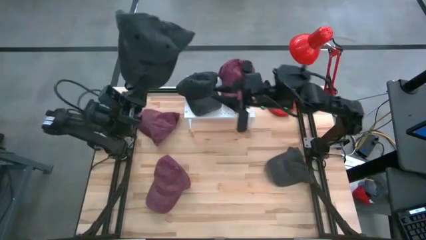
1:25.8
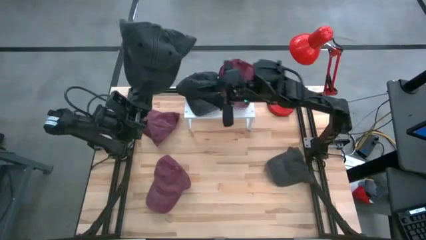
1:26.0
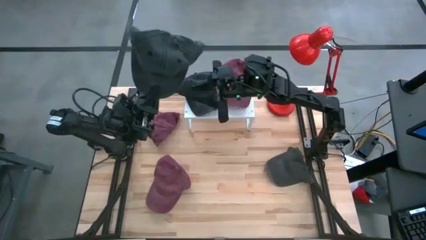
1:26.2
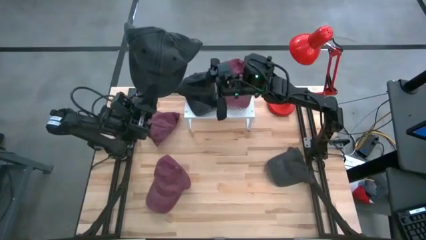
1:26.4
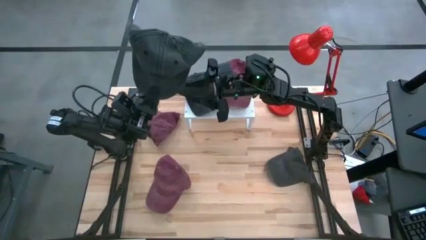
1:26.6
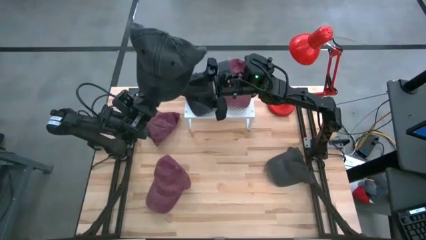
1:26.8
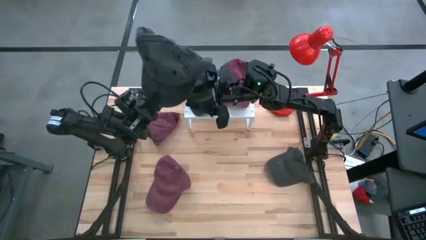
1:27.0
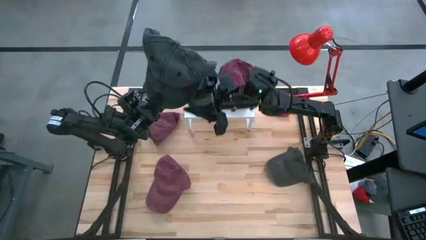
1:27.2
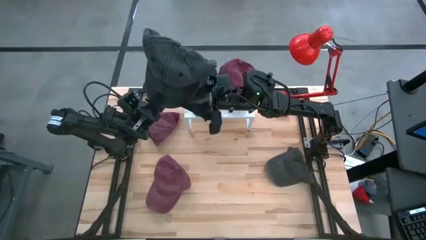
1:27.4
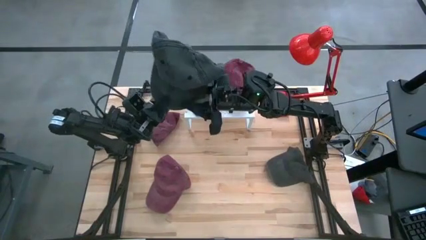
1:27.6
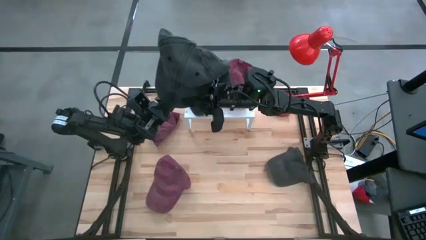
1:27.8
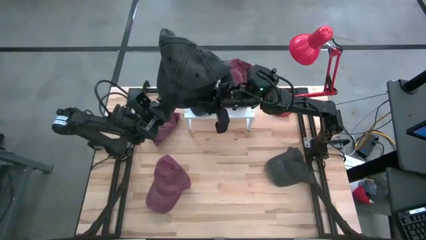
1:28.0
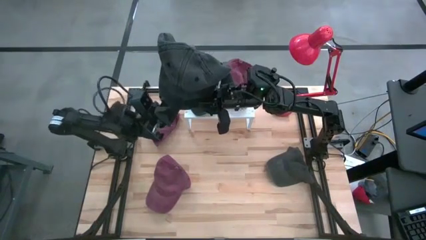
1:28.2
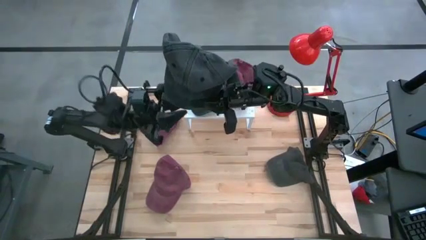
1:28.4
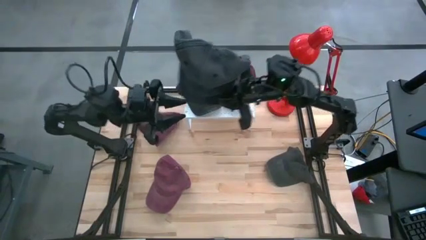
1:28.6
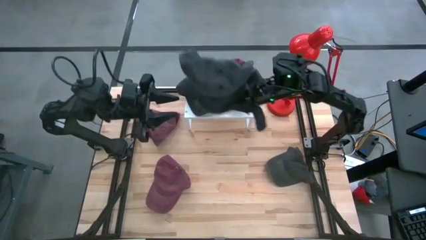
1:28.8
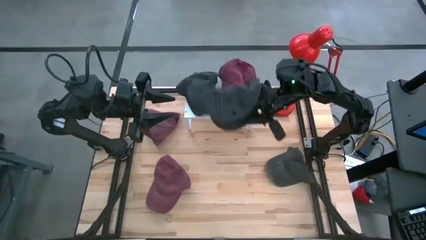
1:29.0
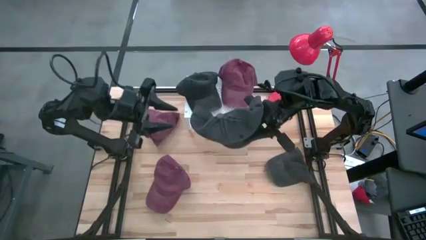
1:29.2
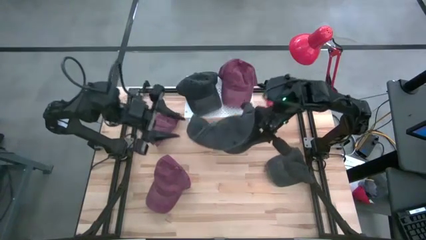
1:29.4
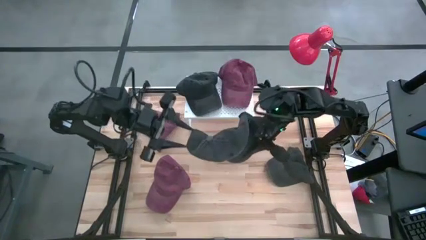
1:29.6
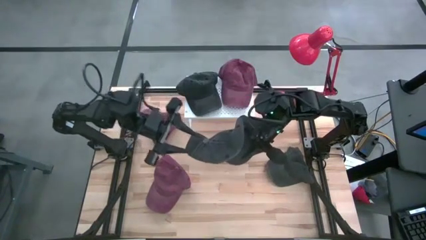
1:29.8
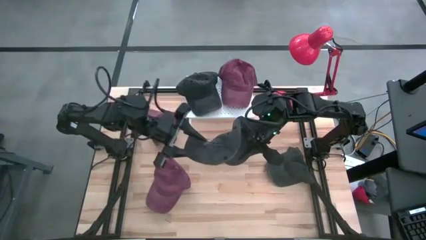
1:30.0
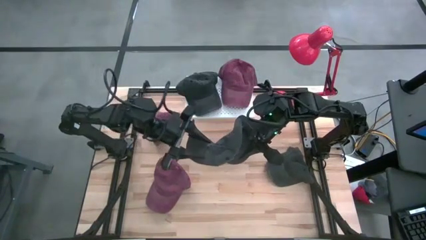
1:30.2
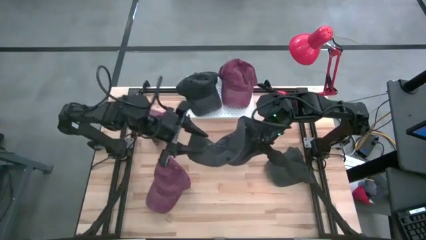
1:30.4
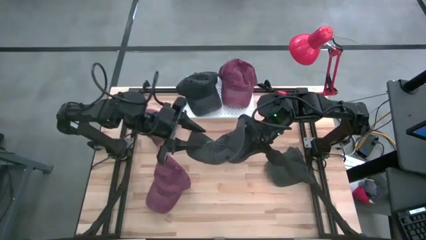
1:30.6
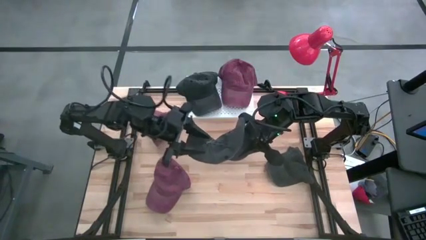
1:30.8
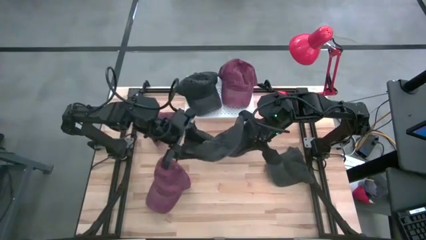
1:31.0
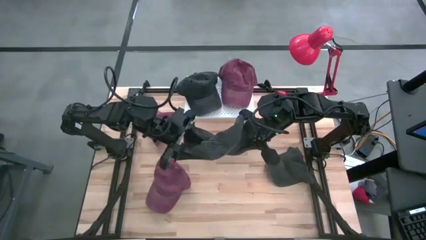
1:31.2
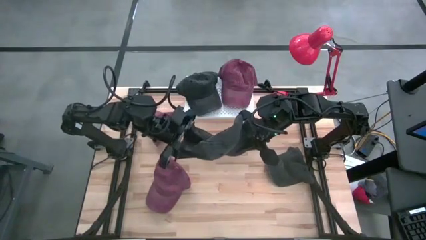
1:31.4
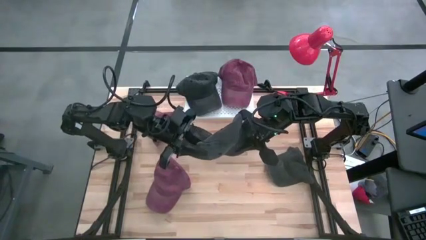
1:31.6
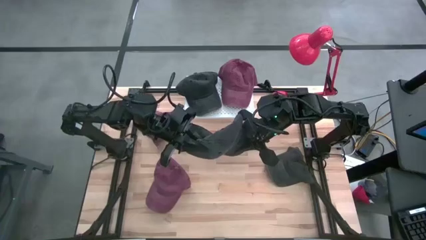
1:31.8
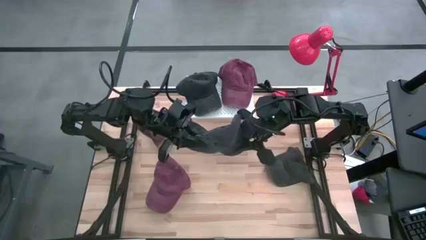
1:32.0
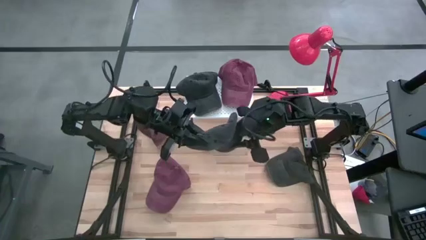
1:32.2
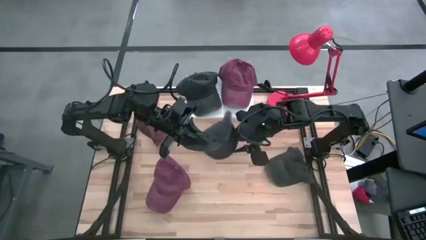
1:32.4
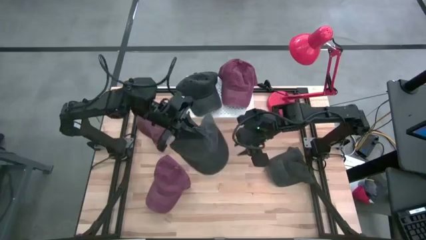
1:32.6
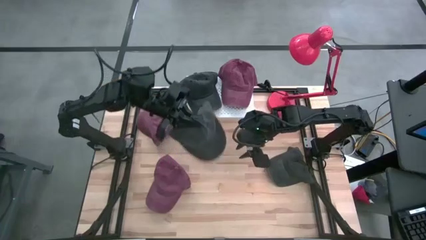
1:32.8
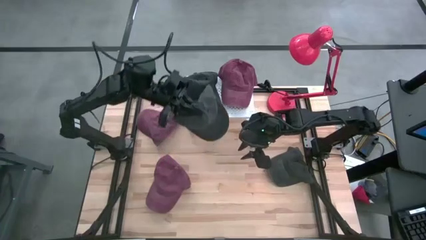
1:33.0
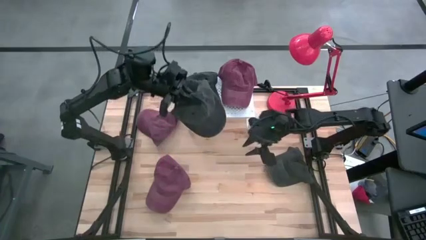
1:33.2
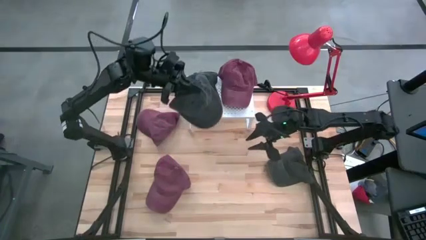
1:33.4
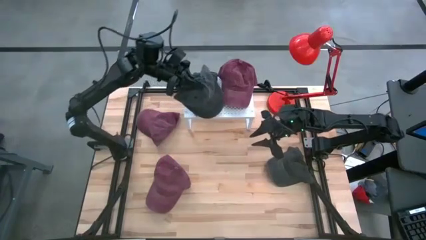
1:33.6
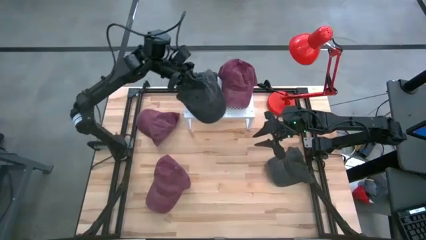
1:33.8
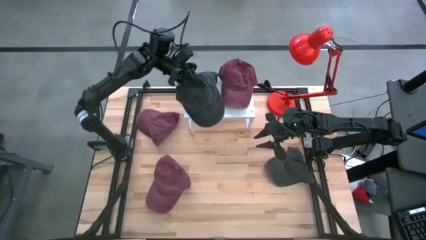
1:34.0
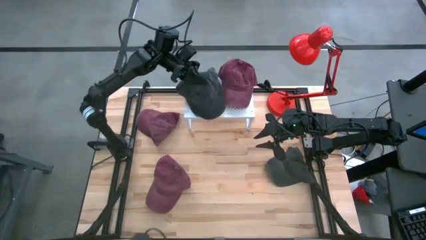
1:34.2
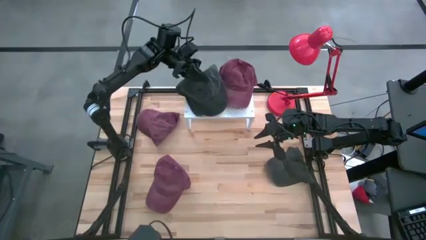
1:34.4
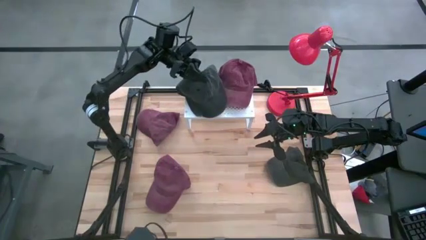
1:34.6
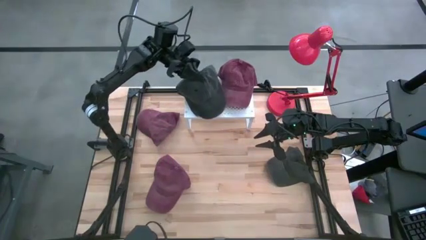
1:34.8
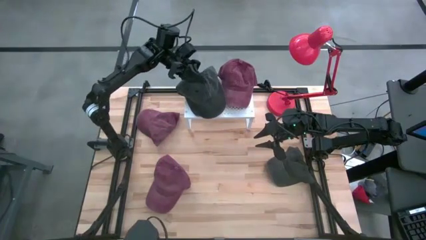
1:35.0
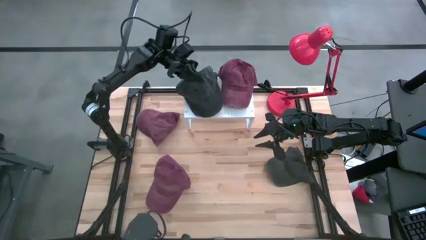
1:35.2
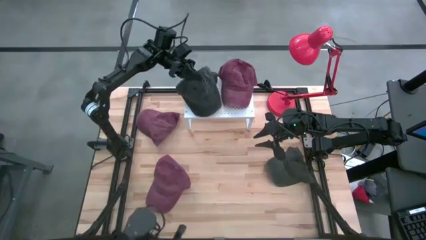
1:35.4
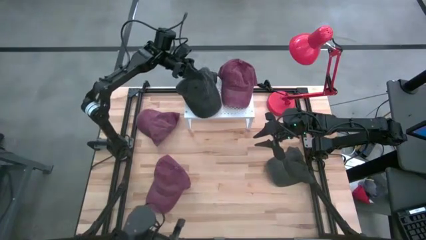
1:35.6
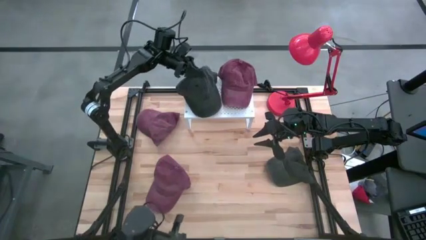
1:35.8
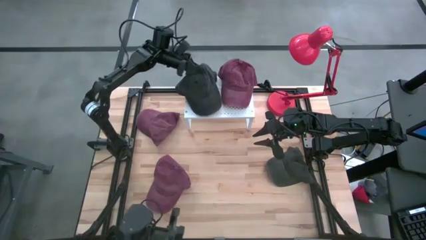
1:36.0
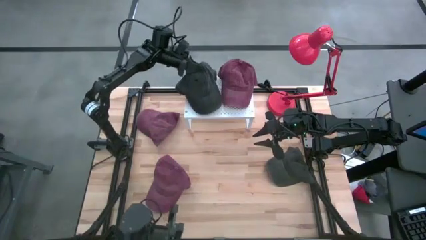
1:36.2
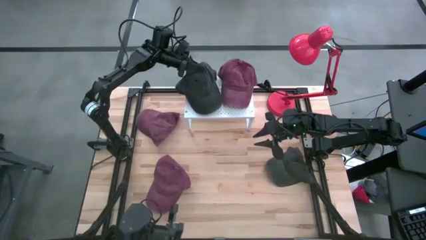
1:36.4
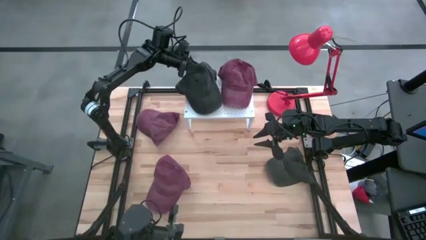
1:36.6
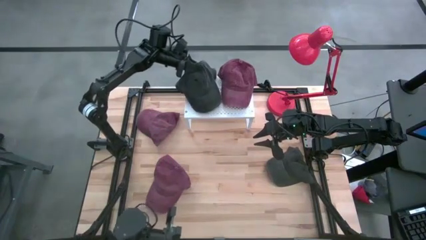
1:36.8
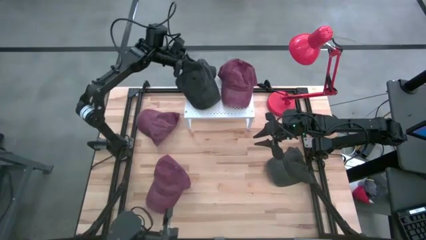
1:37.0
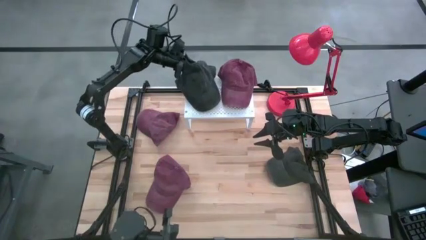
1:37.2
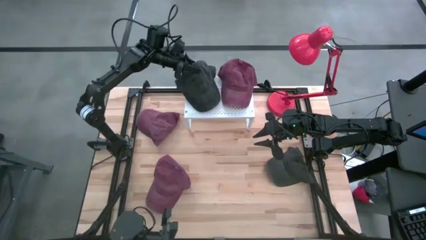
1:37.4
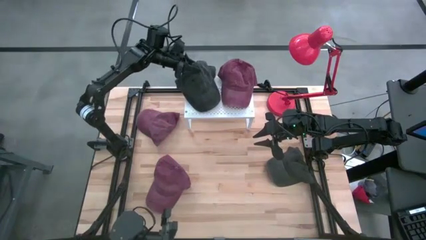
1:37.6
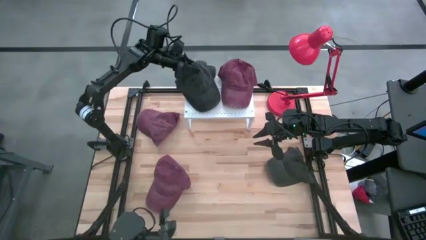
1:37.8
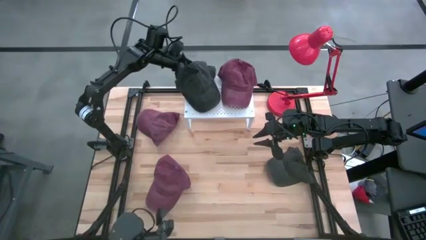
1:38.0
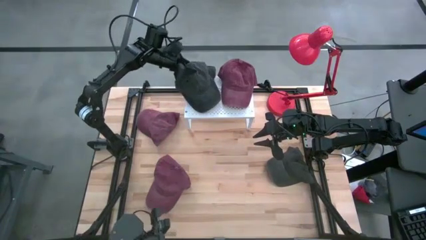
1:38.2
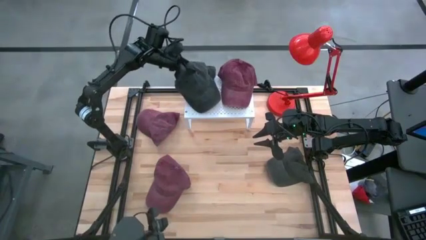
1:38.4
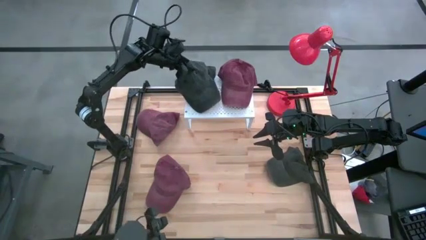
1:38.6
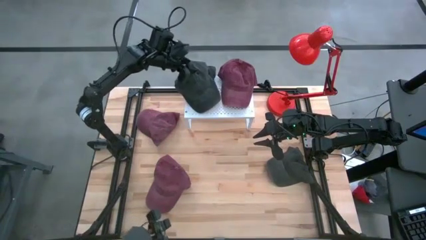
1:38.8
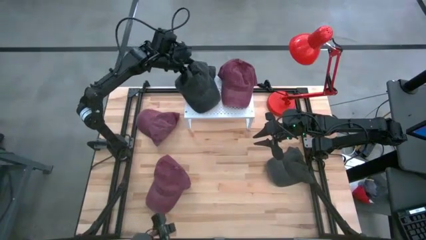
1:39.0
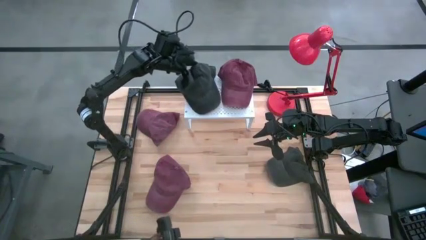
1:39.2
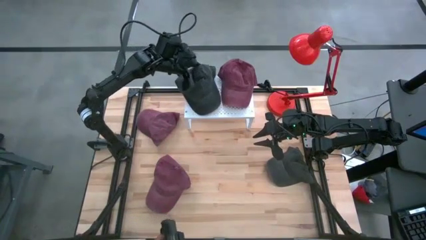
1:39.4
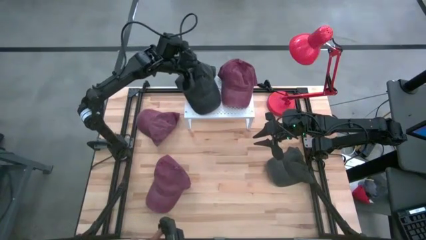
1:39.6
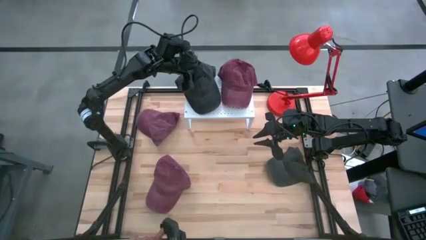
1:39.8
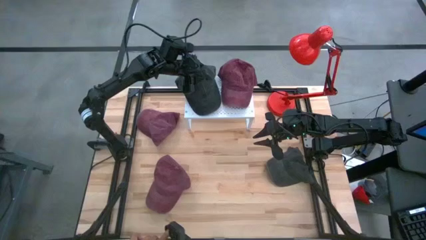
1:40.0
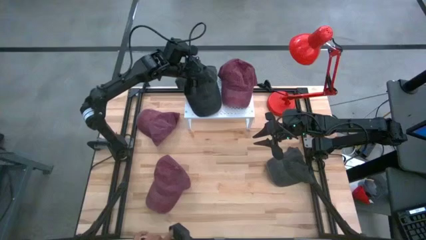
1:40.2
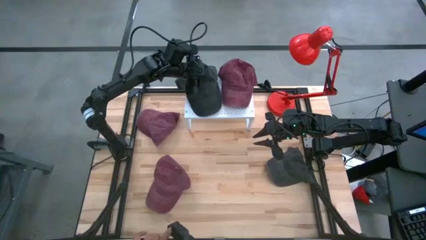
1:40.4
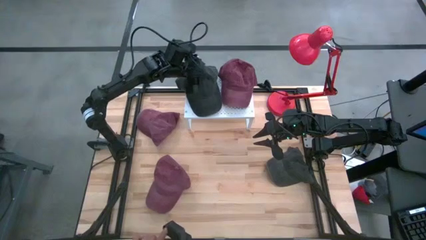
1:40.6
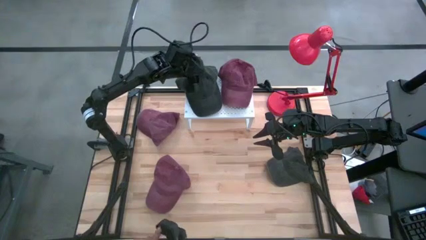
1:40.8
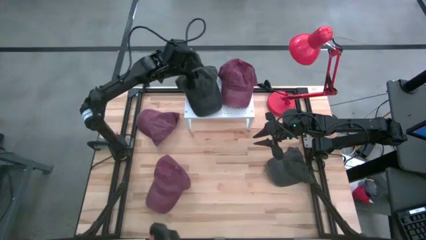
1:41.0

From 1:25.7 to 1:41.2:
Task: Pick & Place hat
Stack the left black cap on top of the black cap on the shelf
